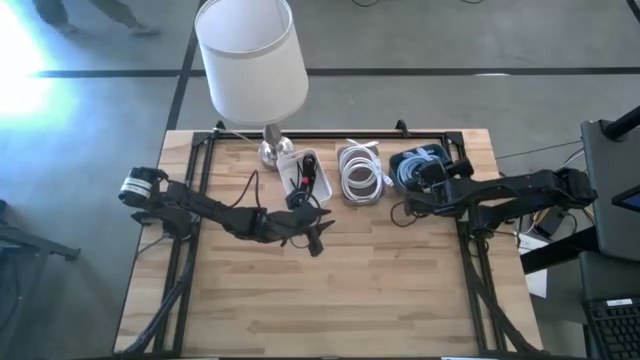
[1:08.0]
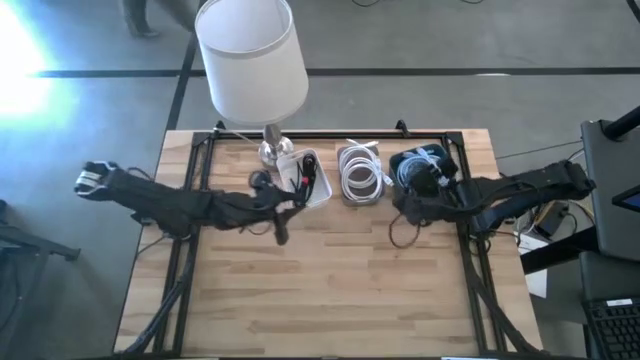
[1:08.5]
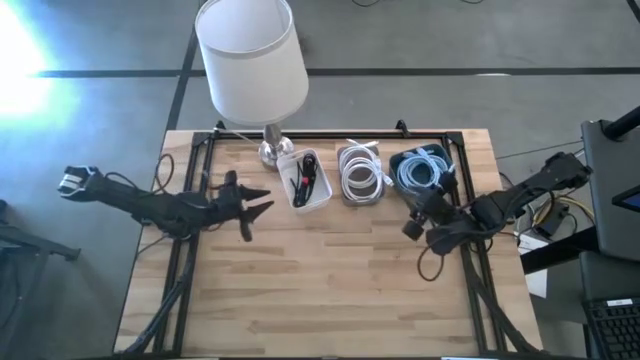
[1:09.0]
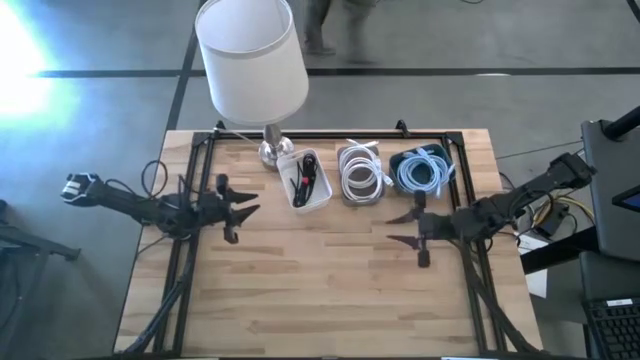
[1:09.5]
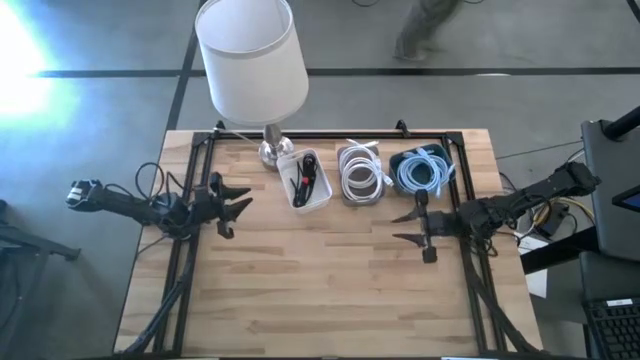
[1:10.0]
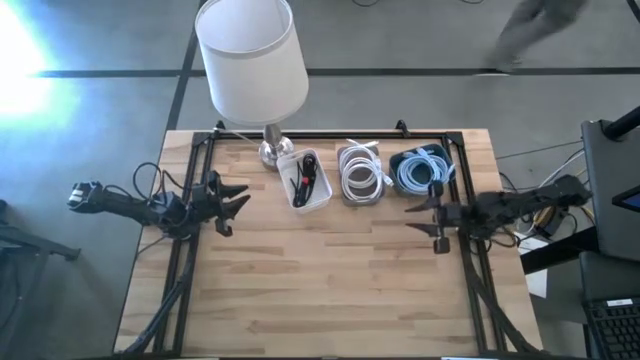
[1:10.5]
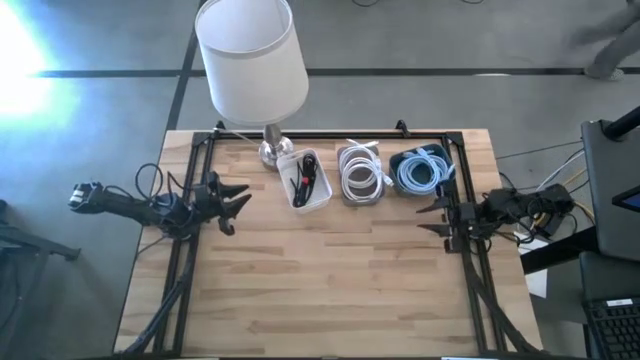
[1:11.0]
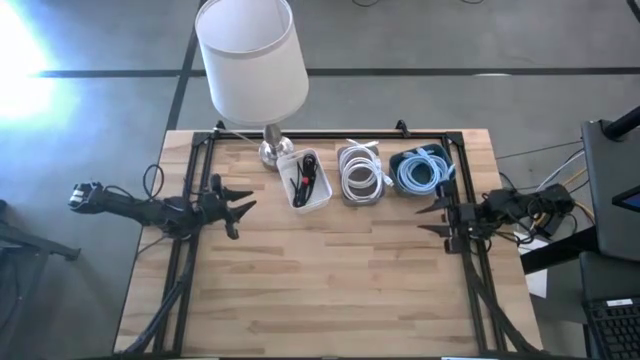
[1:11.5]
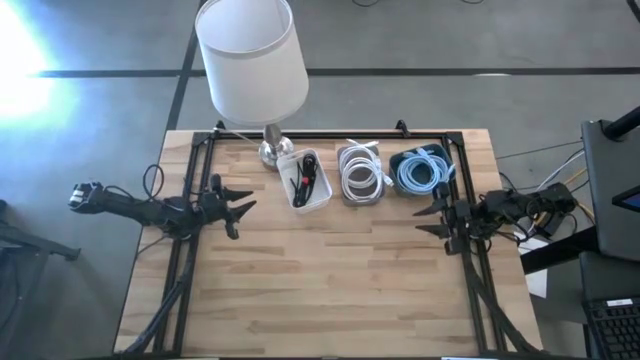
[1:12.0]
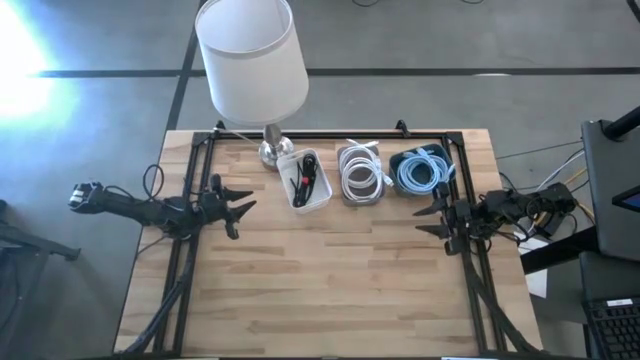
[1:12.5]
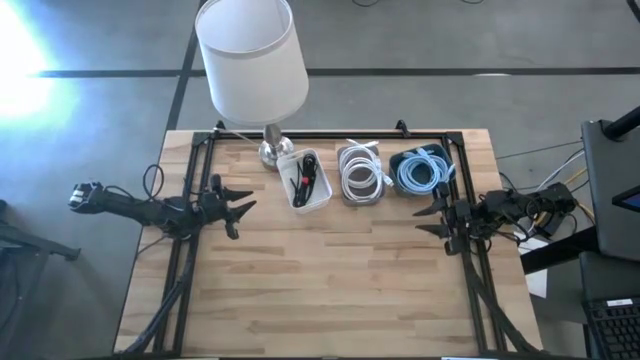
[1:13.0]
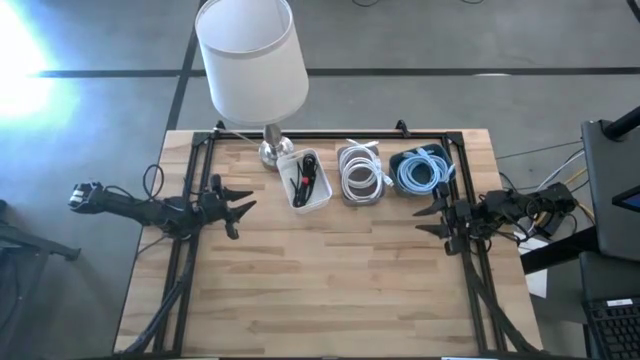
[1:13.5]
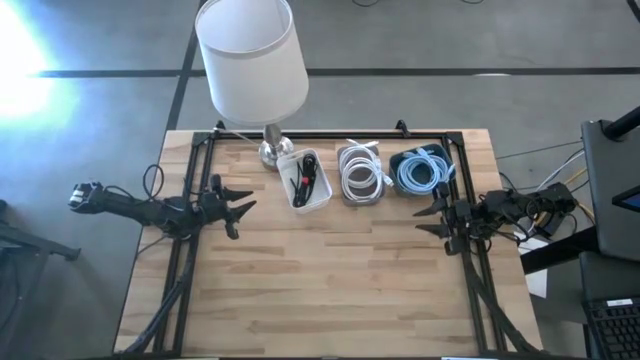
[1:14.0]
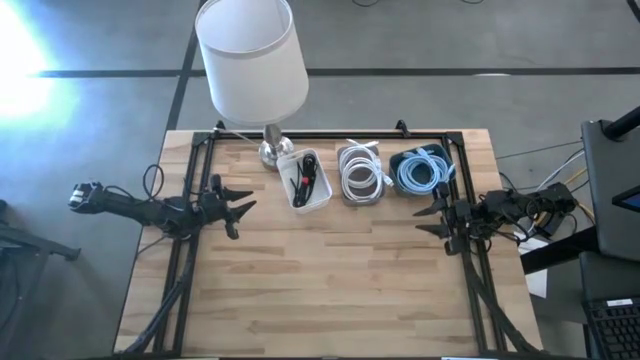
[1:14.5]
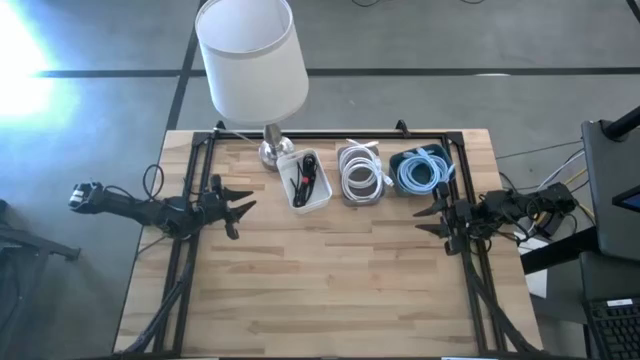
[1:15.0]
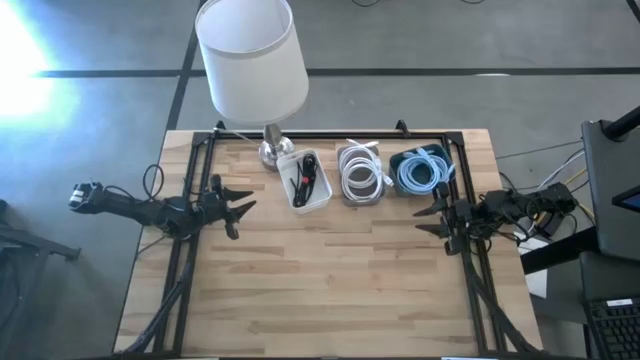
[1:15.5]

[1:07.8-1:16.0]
Task: Pick & Place USB Port
Return to Home Position

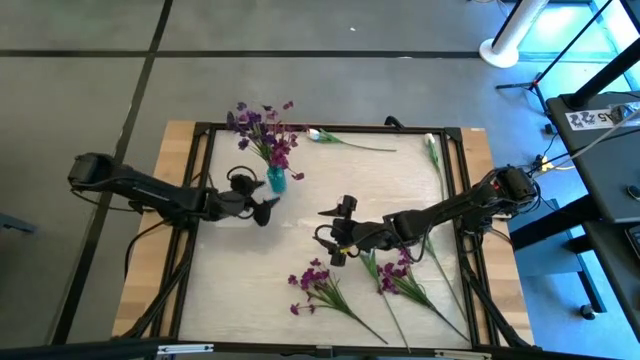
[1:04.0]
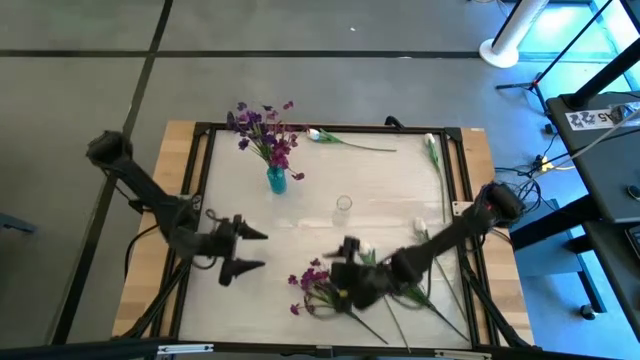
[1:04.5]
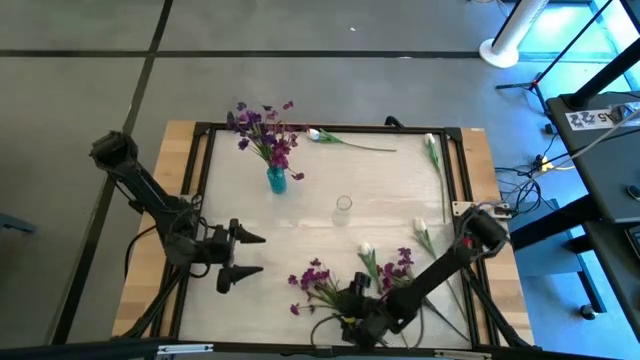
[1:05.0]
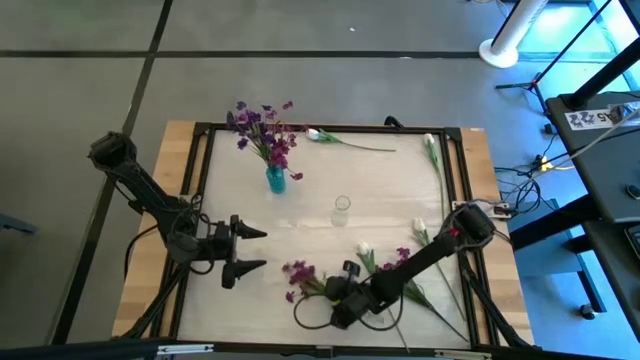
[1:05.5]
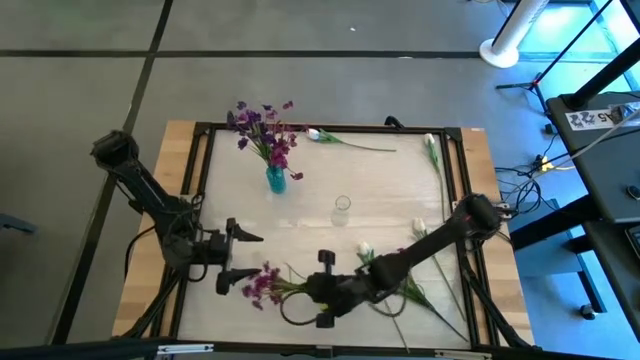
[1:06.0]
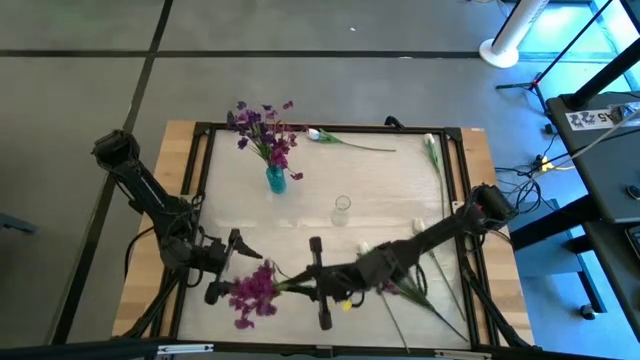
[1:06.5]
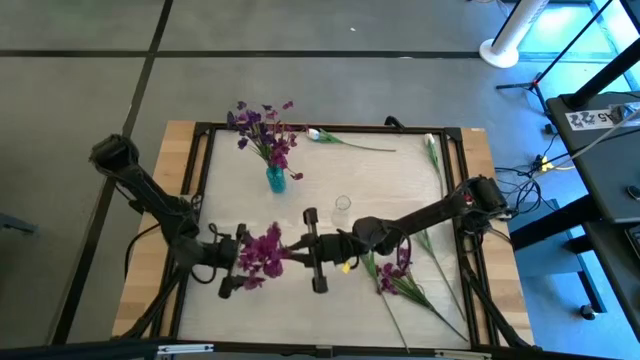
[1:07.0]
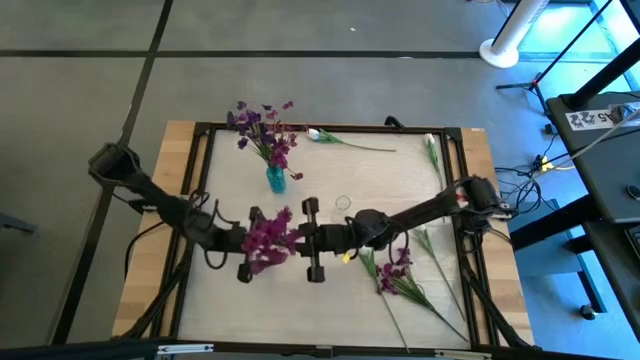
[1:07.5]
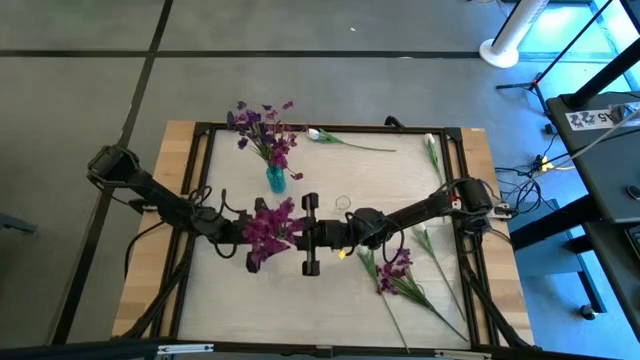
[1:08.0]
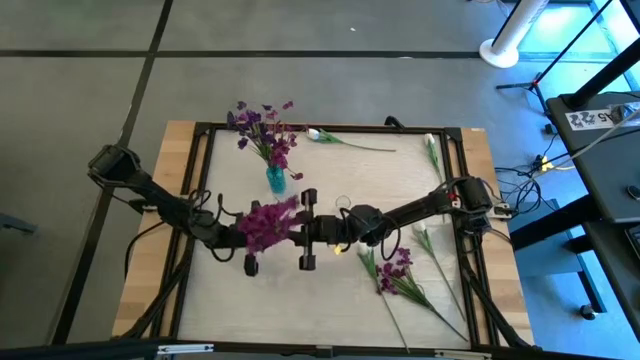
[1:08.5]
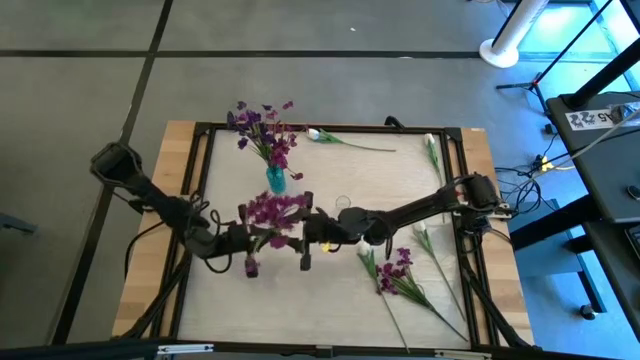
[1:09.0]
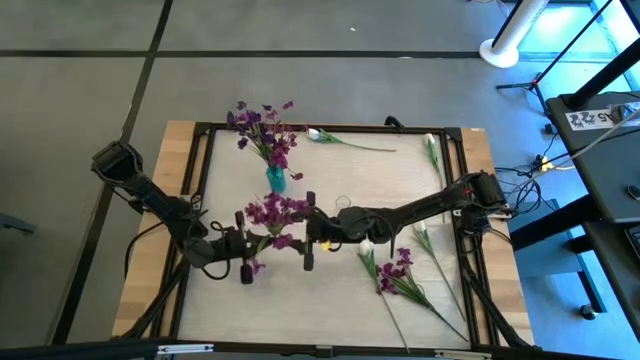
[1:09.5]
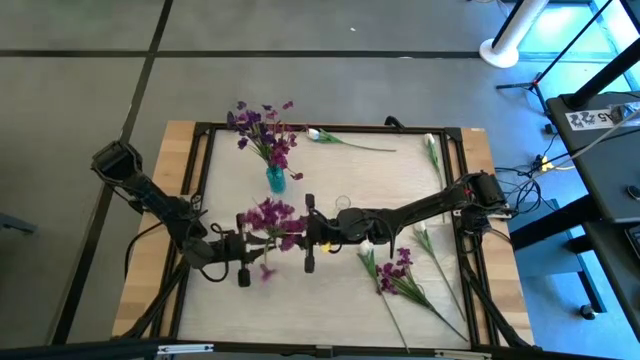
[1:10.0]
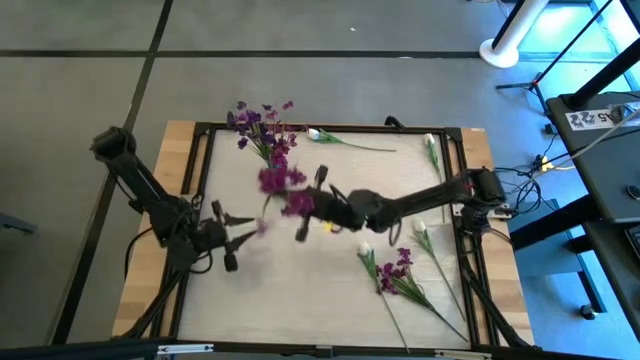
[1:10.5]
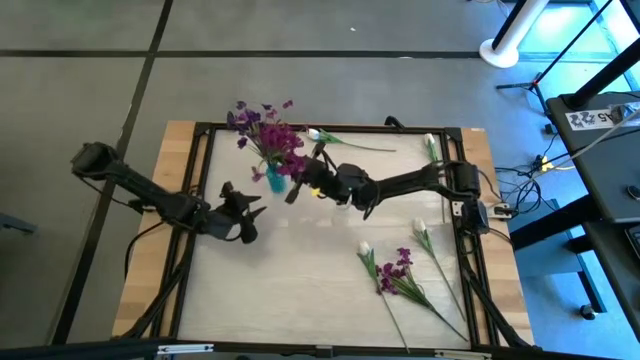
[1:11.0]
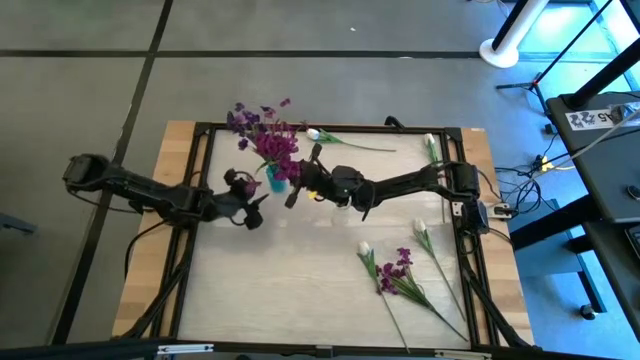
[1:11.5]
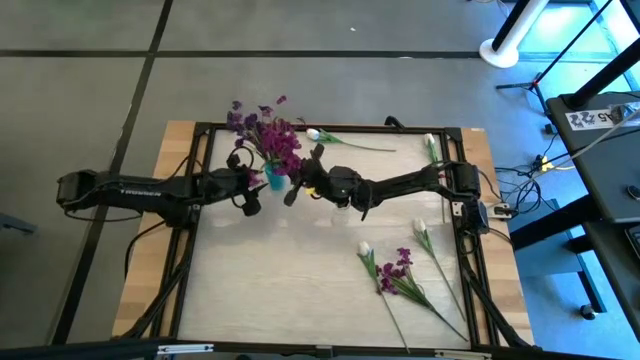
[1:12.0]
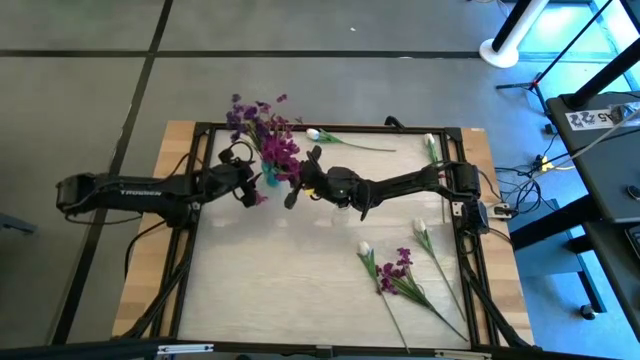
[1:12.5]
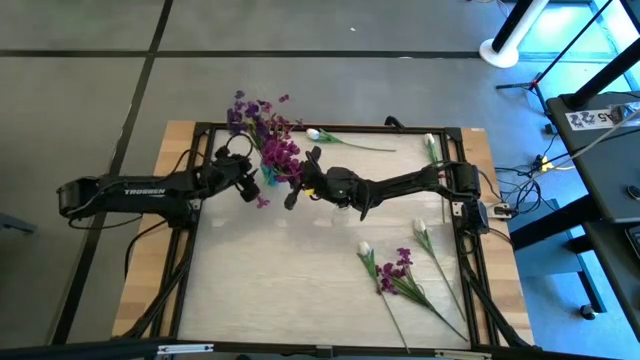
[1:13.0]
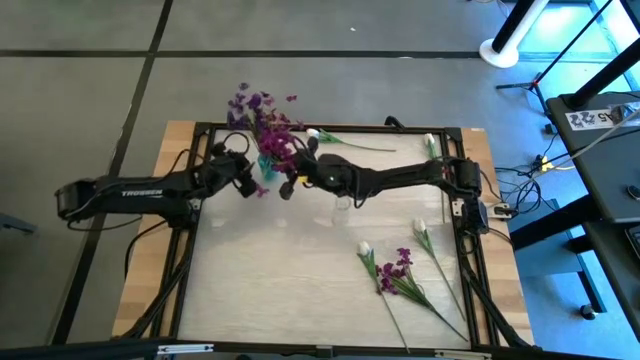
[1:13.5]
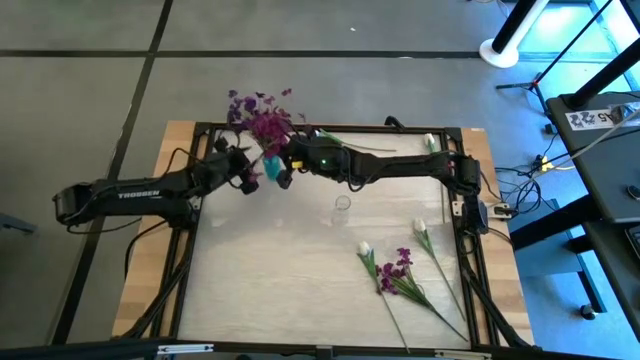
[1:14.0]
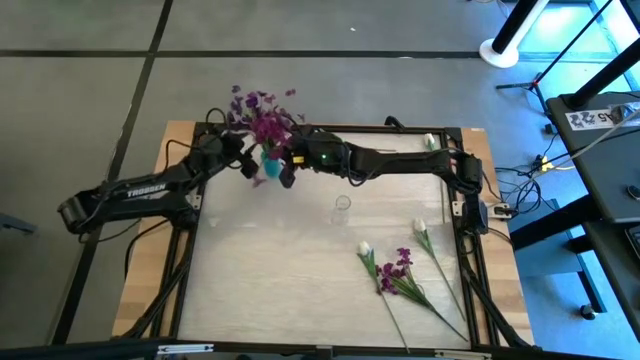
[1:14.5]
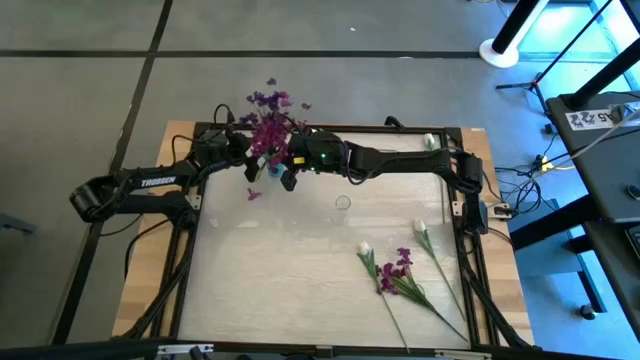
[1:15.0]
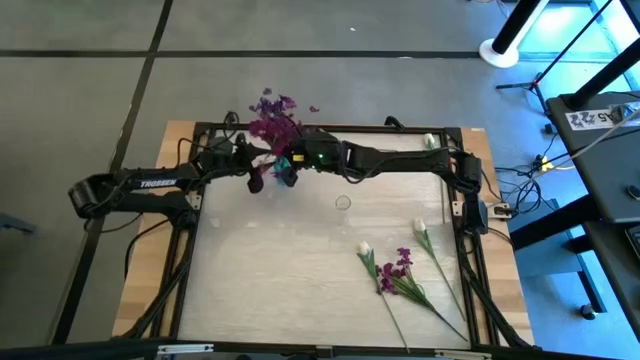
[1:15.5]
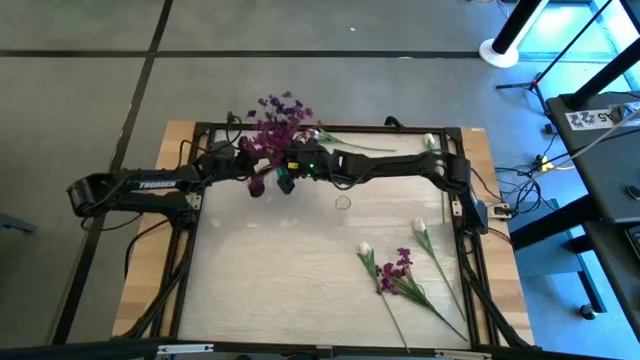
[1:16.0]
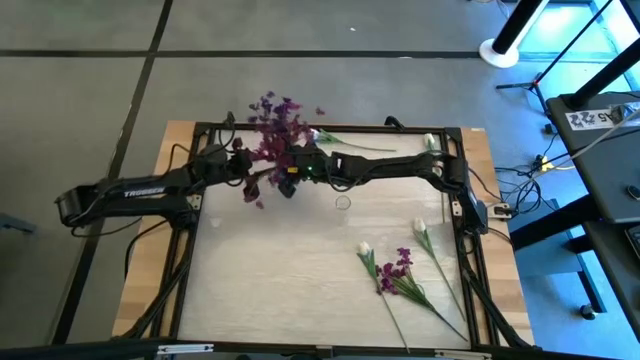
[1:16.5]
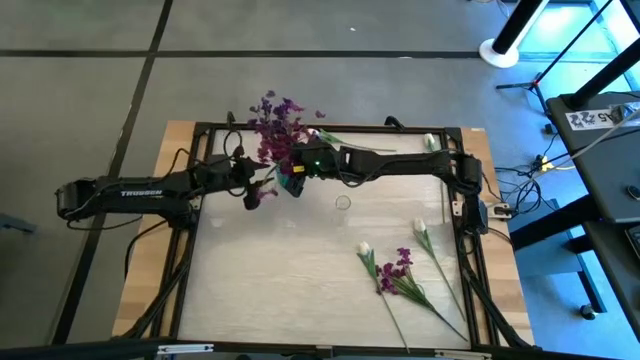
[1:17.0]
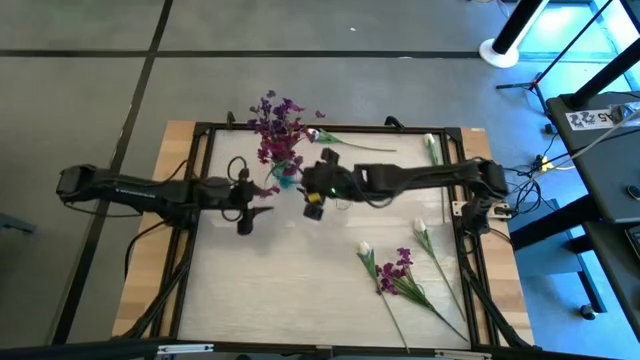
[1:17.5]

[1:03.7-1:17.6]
Task: Sort flowers into vase by color
Put the left purple flowers into the blue flower vase

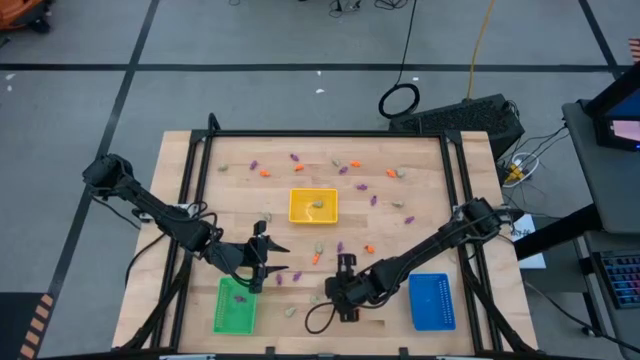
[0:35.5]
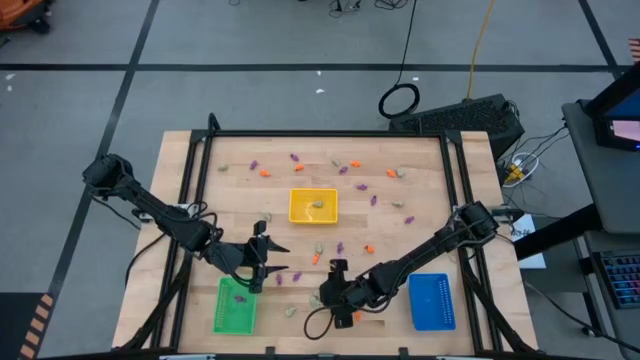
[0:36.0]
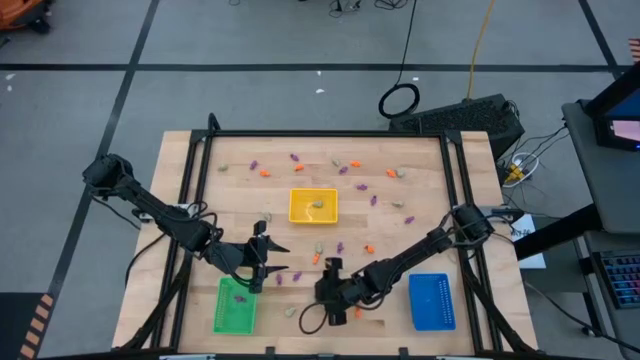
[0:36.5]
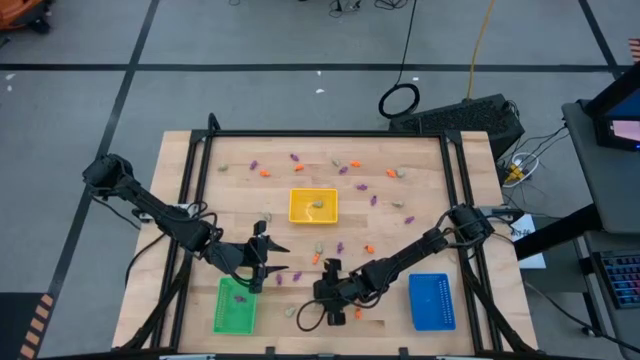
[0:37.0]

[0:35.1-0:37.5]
Task: Sort Halloween decoration
Put the white skull toy in the yellow basket
